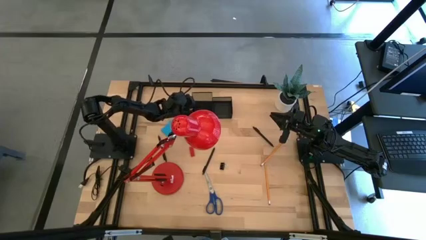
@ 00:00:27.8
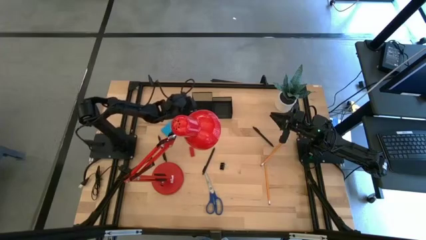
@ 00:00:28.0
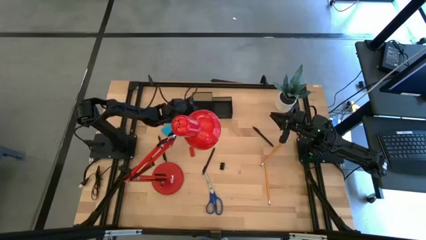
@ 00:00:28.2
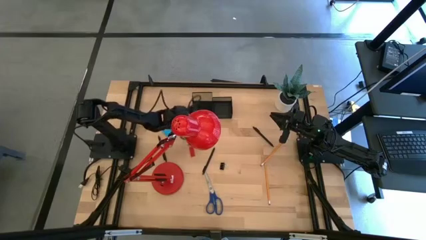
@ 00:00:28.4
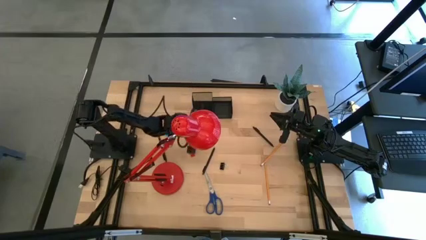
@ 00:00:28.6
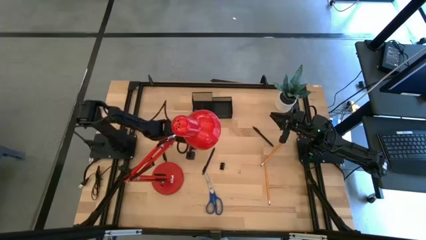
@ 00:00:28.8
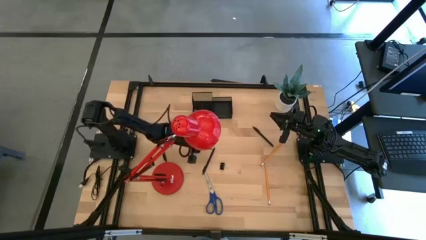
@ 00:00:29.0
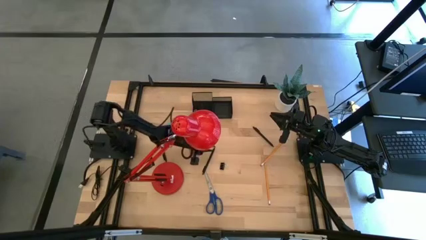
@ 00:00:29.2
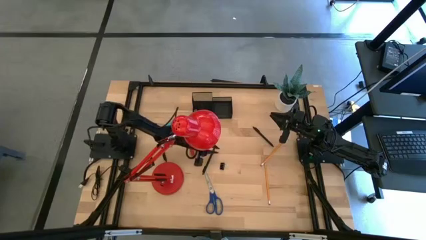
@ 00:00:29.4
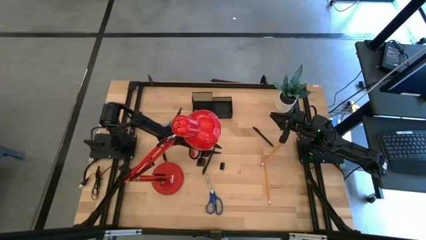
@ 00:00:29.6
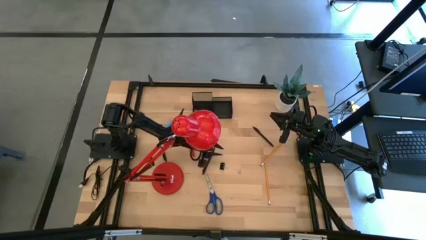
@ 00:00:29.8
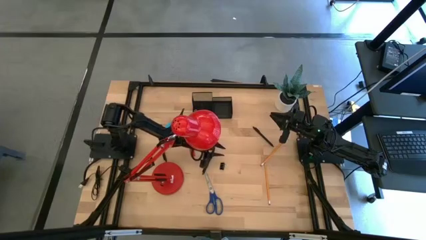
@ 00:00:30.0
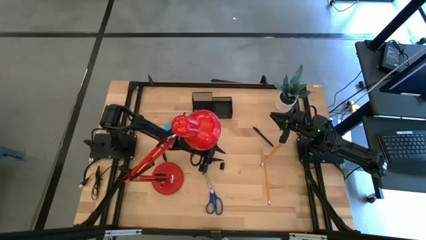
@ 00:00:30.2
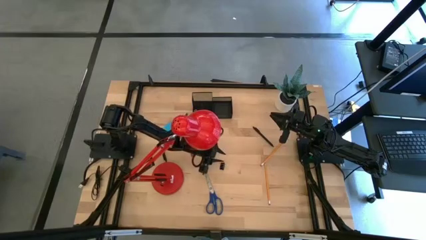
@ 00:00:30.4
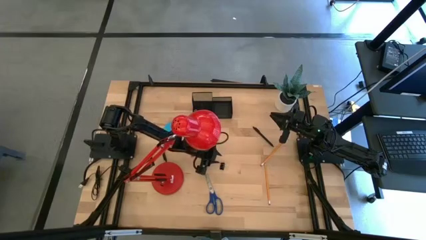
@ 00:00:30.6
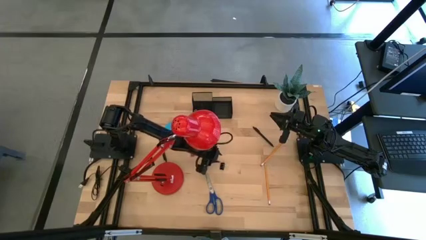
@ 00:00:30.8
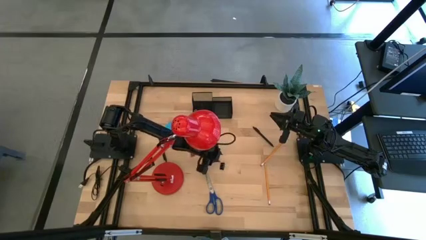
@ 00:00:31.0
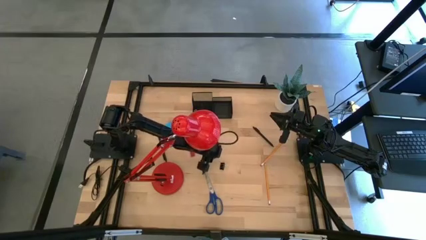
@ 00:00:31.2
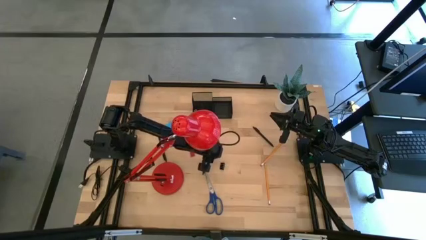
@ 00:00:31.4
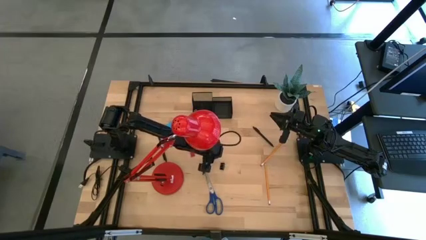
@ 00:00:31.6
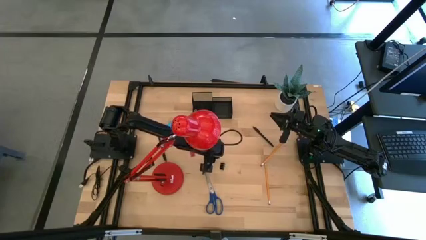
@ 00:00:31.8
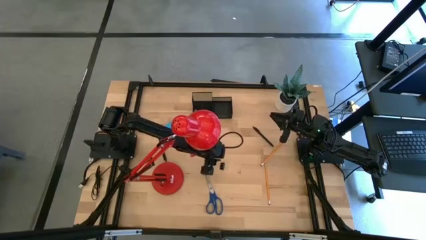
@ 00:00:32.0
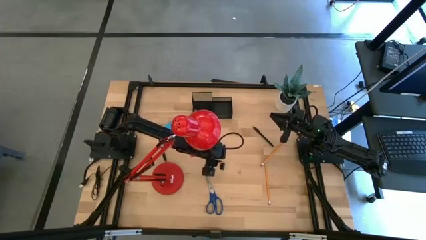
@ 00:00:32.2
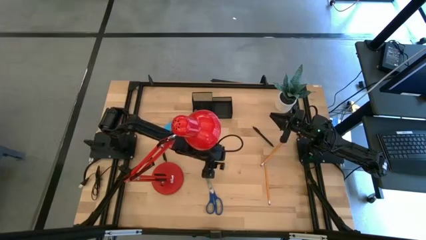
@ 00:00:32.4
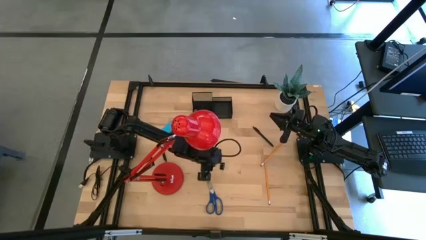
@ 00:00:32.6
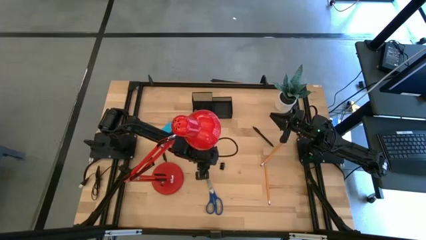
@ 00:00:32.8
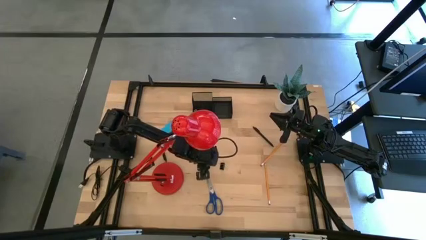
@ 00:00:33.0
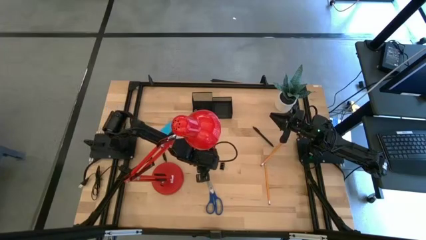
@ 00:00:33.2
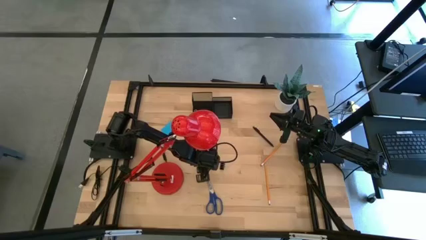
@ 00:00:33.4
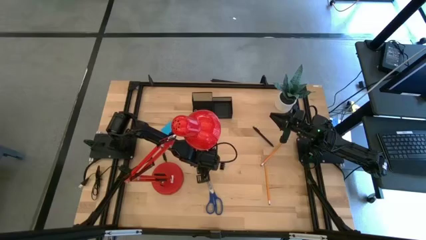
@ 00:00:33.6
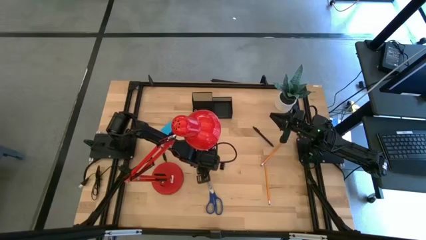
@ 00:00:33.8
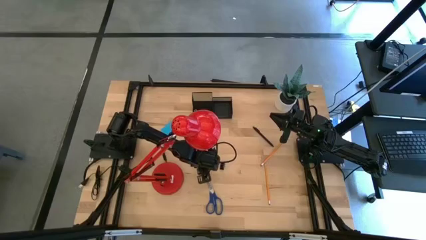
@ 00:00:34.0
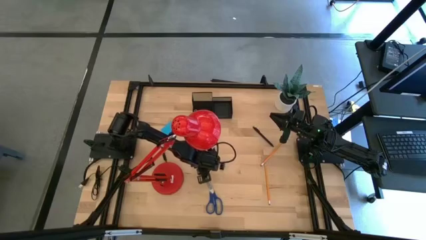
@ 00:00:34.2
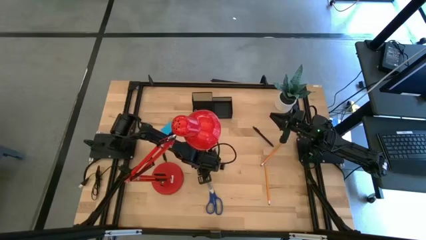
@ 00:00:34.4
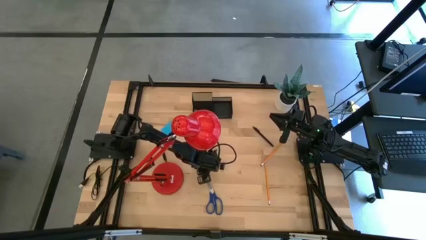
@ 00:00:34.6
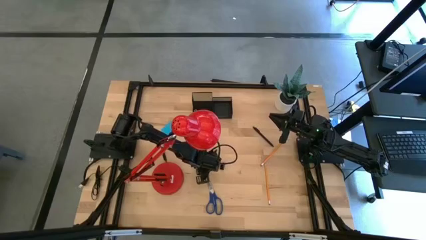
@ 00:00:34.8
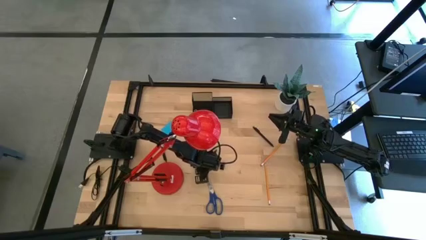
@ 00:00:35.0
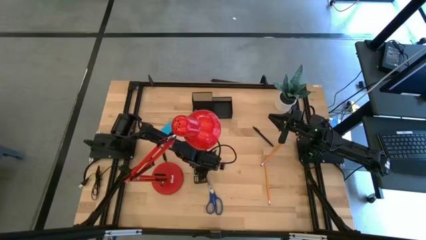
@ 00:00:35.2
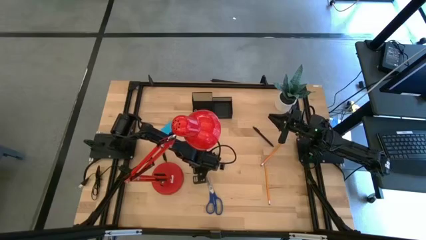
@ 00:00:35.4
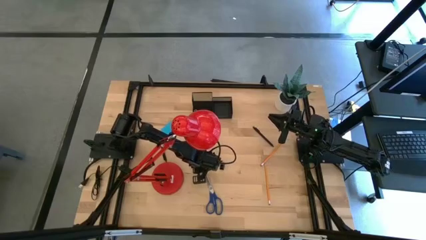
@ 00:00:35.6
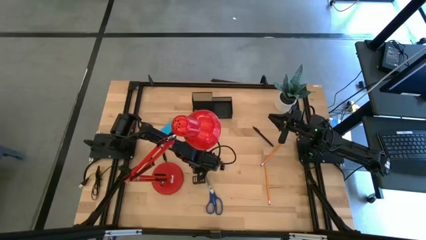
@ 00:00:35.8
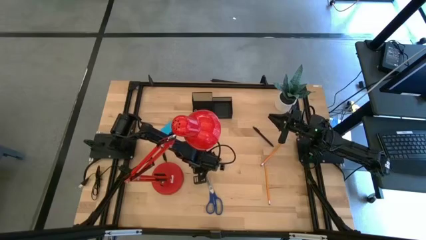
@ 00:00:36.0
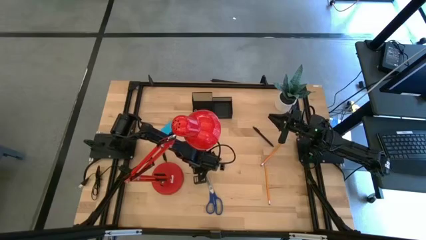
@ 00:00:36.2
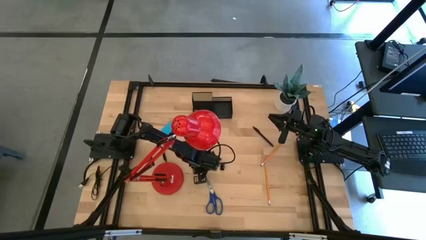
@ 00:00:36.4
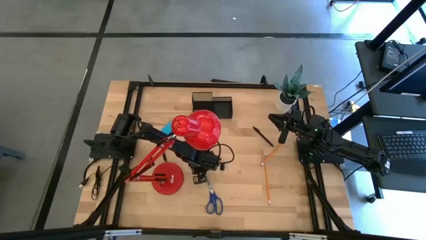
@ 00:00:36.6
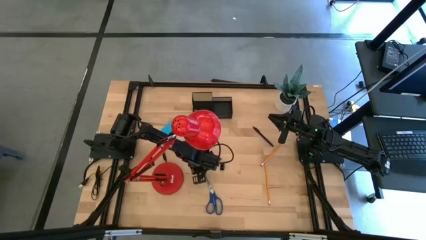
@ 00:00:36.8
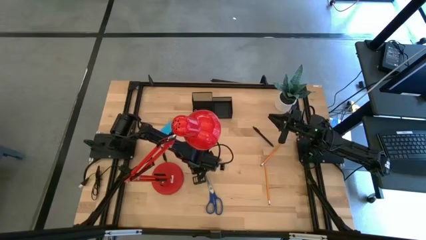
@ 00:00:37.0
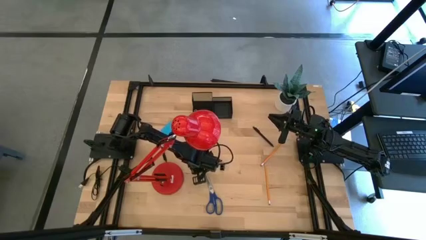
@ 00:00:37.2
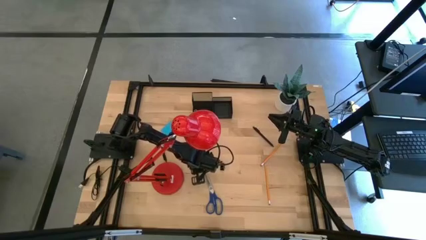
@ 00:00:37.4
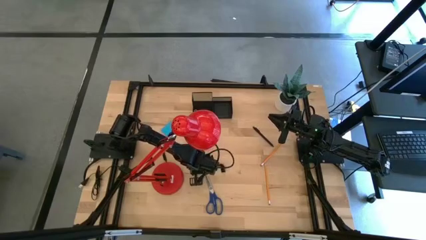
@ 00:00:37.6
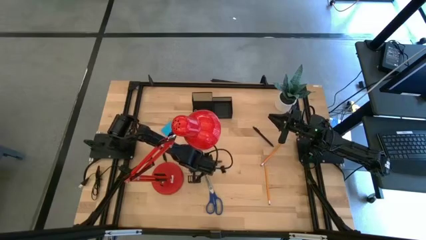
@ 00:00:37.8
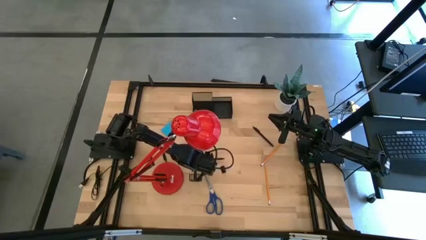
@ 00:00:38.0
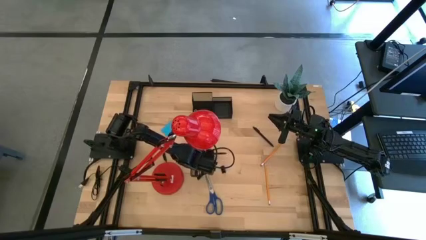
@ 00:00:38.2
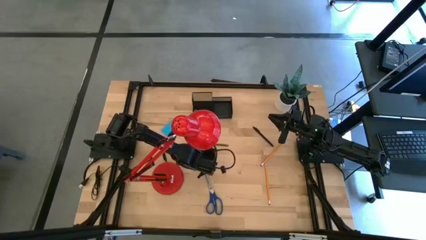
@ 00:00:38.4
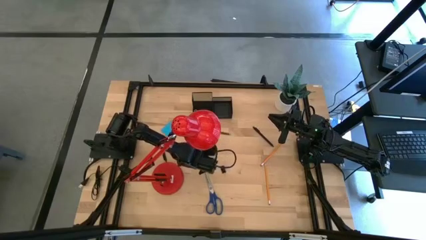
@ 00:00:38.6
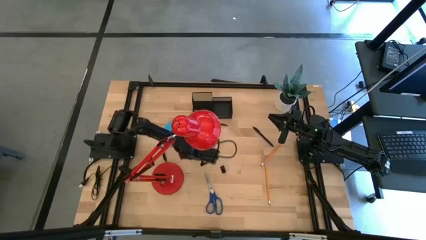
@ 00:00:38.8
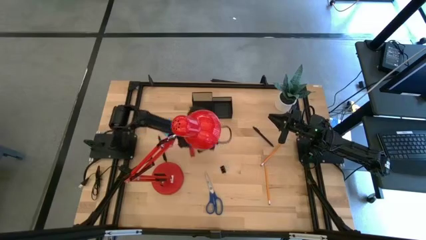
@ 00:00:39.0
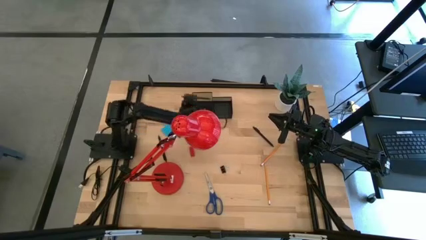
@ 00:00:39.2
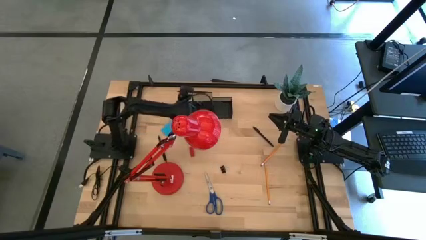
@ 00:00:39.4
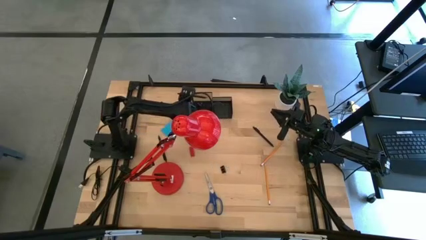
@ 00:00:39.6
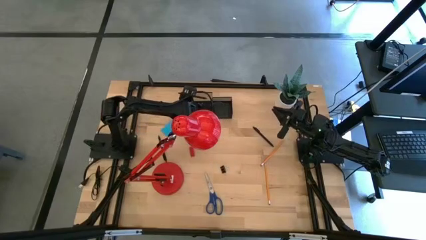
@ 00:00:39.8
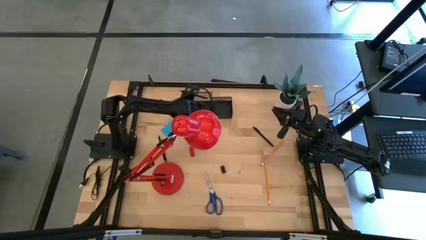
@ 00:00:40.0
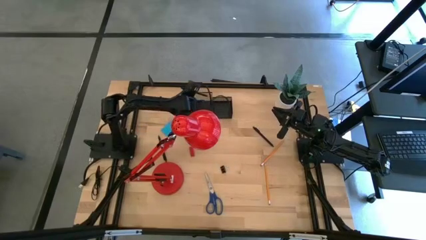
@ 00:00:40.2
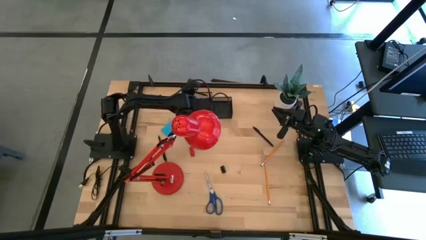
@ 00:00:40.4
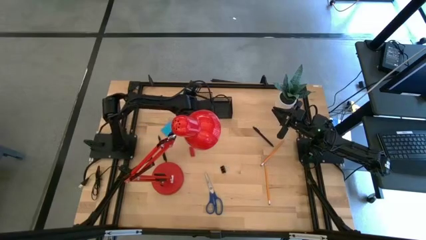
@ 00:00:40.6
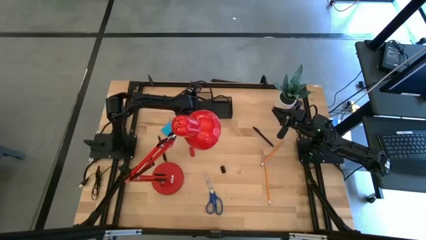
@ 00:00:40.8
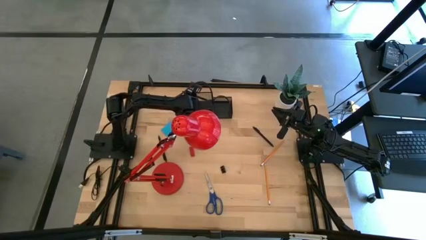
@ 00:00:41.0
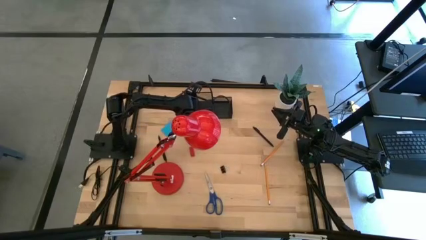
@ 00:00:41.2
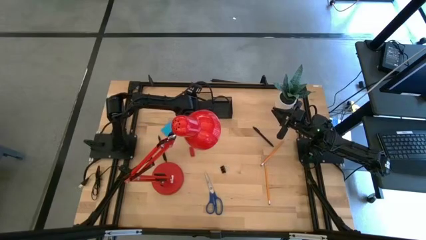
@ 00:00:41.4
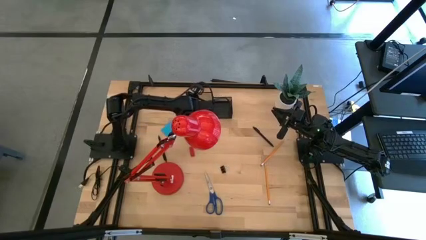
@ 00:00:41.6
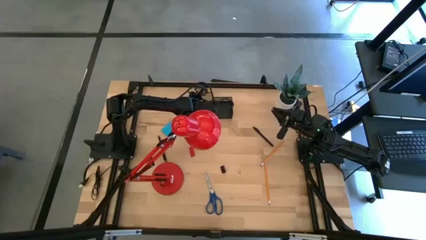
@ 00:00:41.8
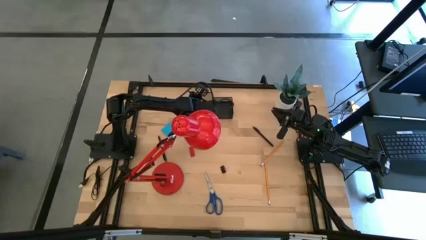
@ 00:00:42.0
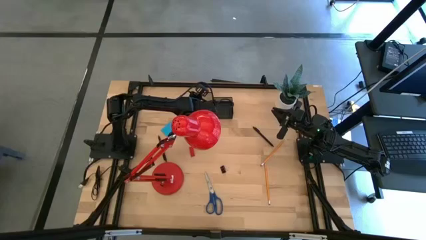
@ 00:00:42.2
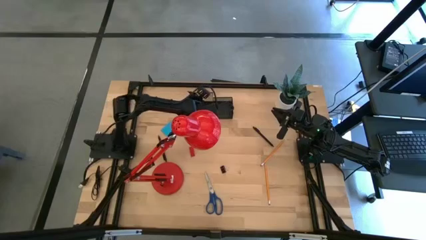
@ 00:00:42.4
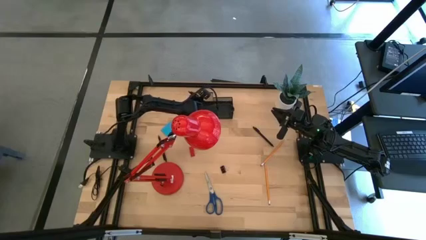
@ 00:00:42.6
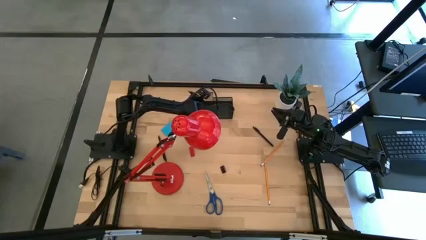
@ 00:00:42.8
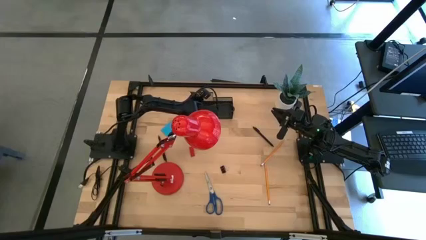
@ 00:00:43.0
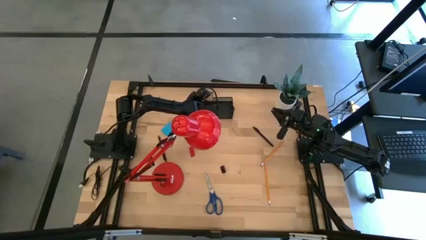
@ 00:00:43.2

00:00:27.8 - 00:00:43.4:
Task: Pick and place office supplies into organizer
Put the middle pen into the desk organizer
